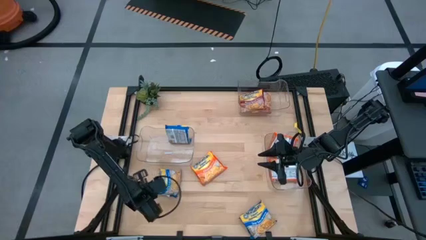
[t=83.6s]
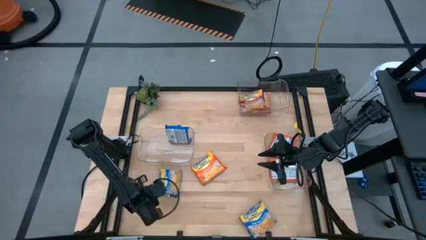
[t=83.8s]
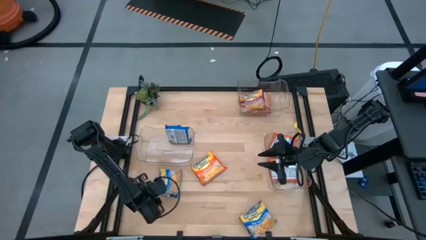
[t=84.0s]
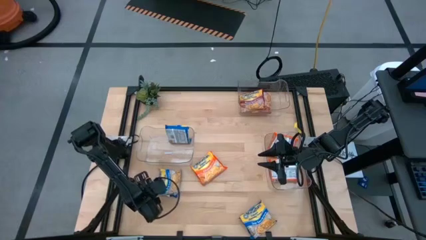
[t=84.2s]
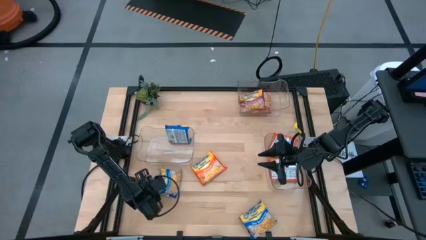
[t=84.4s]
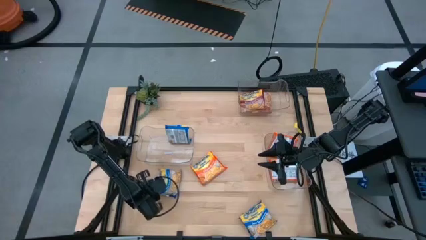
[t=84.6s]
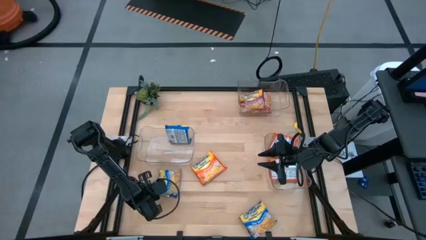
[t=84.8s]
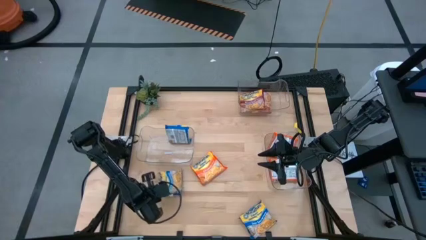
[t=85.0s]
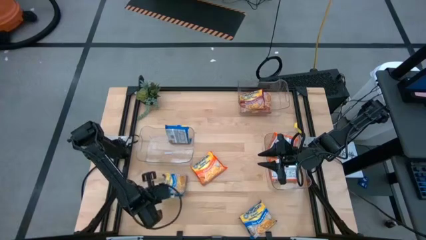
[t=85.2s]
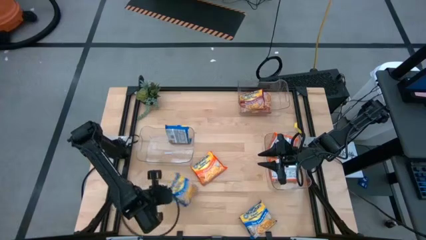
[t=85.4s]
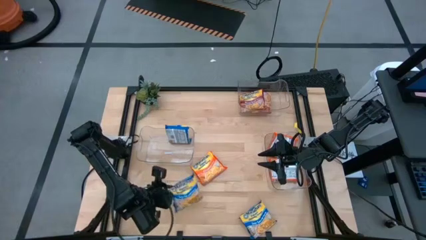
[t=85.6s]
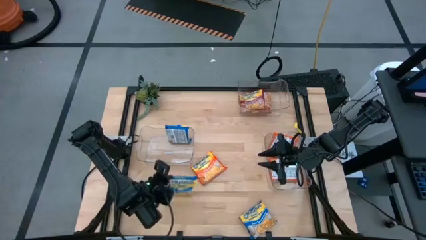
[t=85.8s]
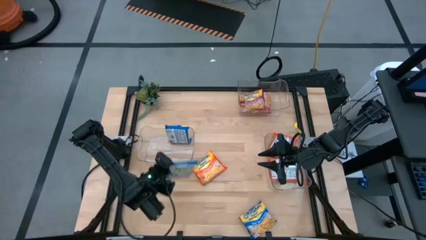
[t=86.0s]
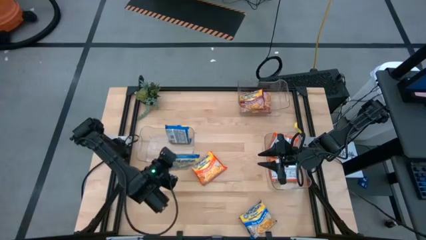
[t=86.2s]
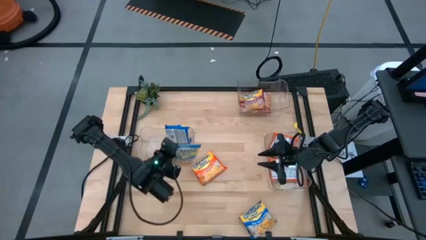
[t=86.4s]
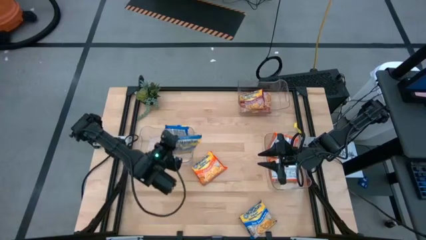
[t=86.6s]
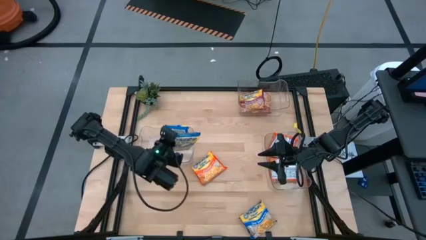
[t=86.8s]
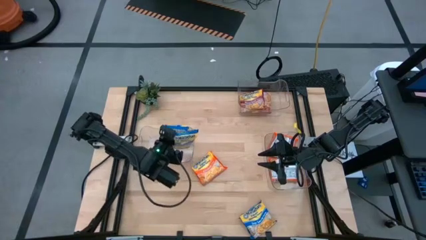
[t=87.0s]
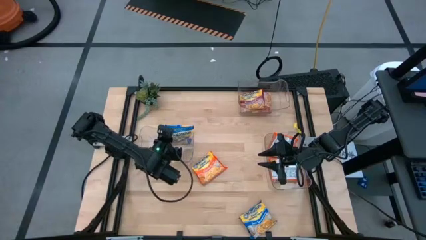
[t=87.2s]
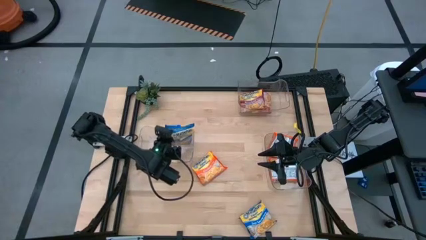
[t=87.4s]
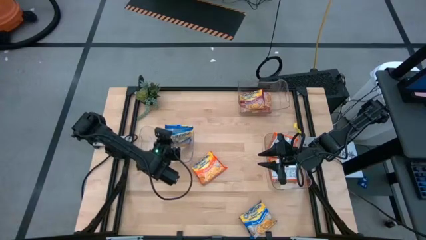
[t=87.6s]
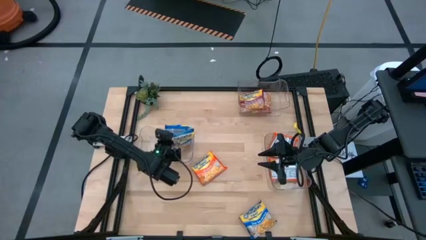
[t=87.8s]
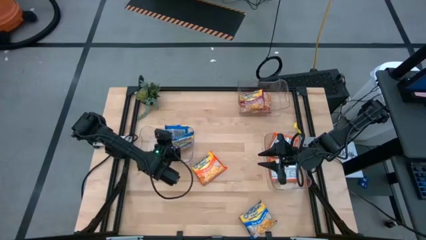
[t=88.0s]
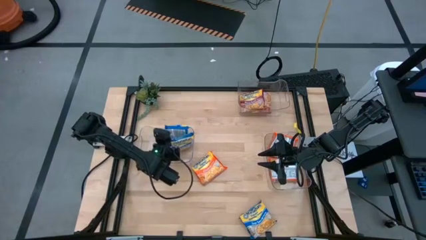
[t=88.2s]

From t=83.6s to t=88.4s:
Task: Sort Maruchan noodles
Put the top blue noodle pack into the bottom left transparent bin

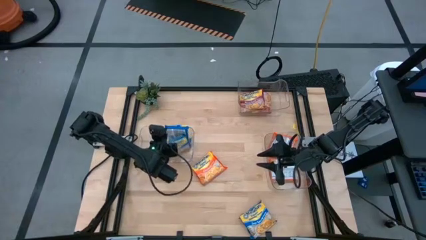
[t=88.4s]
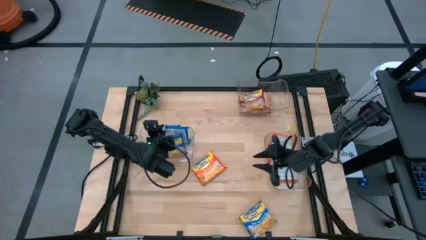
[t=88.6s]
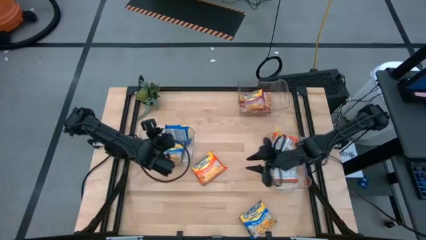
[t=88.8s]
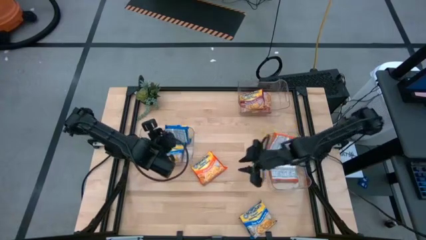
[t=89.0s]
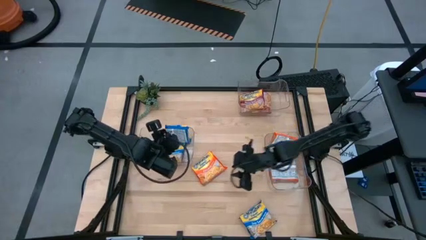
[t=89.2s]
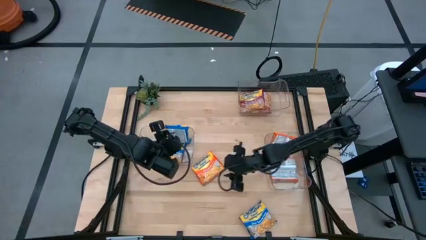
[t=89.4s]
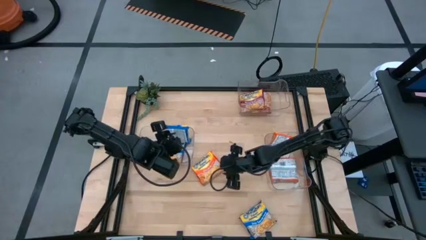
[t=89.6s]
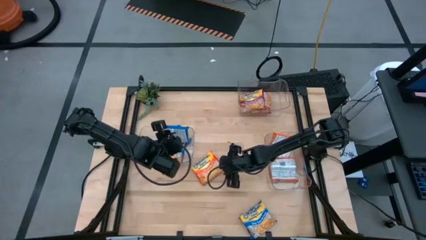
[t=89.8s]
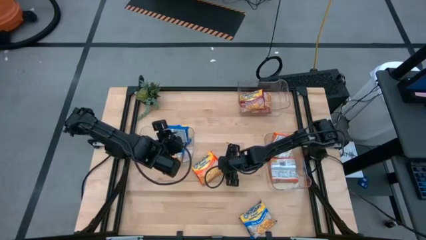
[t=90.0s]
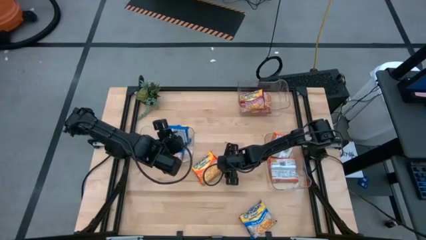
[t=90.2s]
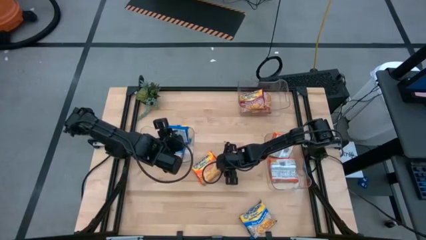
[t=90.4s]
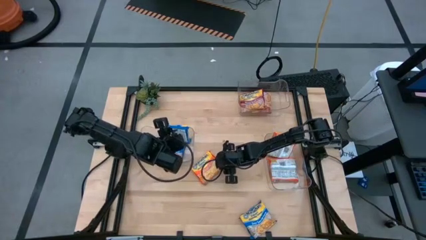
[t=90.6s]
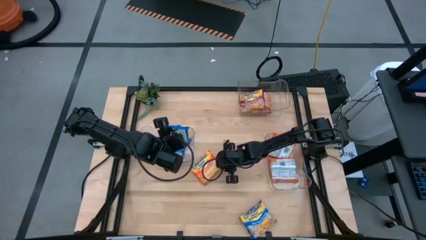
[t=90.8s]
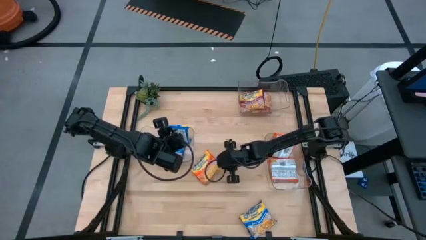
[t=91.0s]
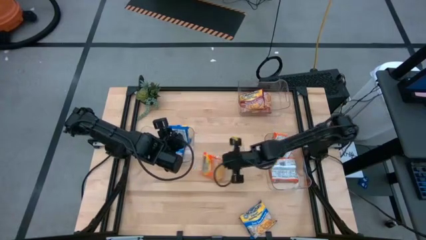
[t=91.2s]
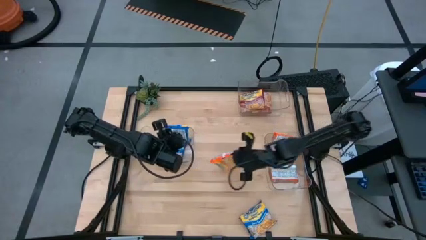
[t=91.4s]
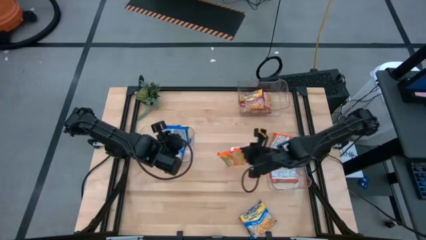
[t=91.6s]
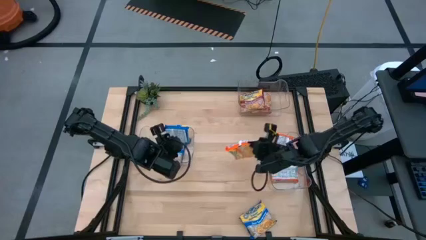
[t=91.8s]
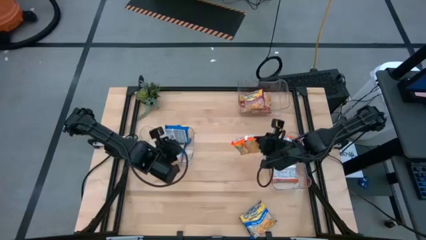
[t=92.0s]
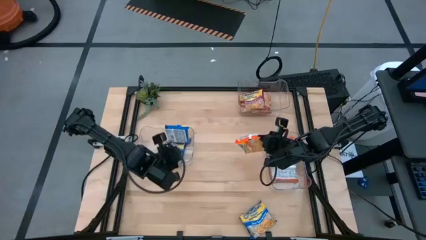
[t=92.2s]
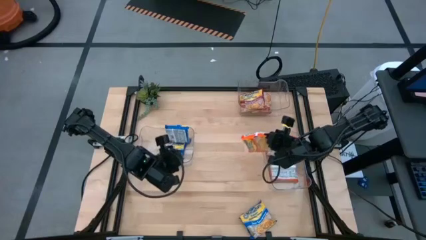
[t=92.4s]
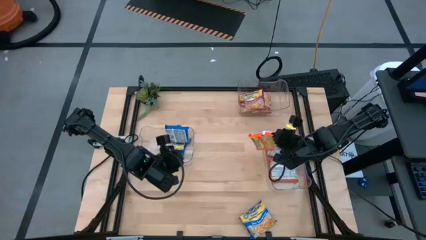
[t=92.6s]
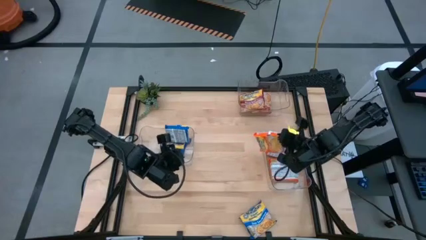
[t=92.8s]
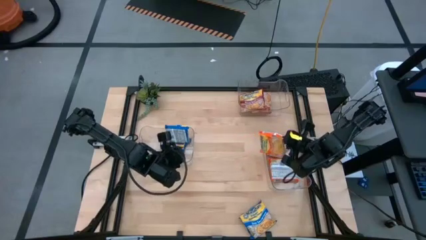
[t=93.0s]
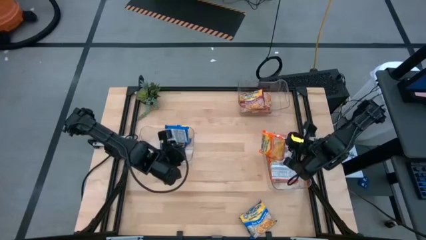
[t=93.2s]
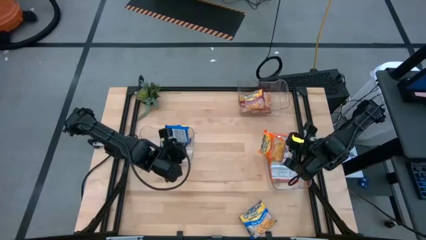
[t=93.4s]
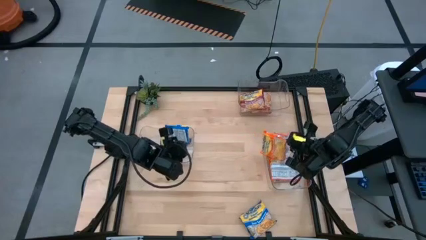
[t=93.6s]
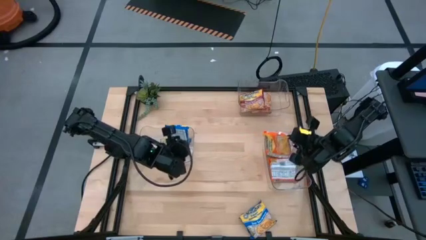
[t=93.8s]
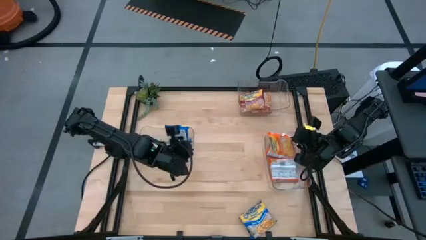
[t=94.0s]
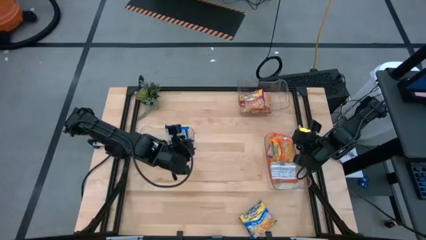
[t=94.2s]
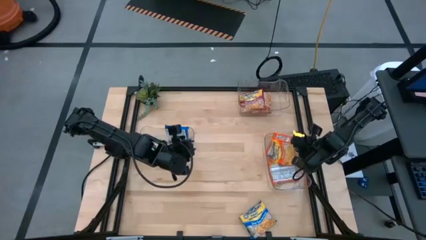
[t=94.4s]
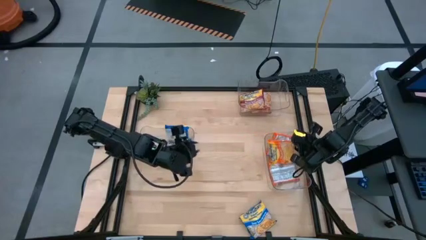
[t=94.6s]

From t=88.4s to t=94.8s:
Put the orange noodle pack into the bottom right transparent bin

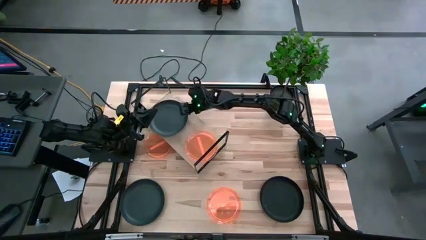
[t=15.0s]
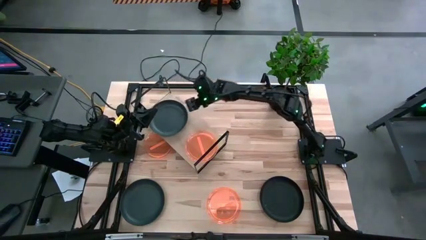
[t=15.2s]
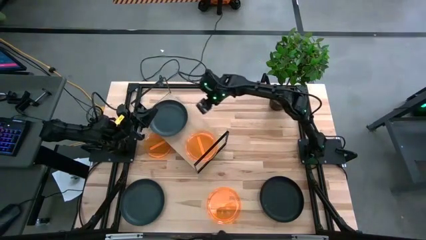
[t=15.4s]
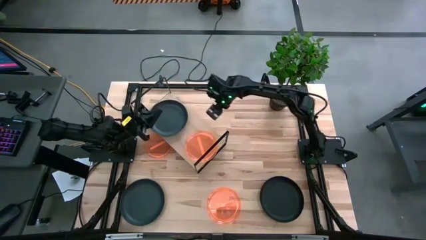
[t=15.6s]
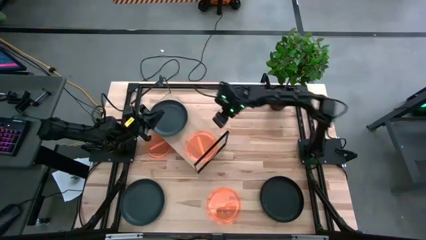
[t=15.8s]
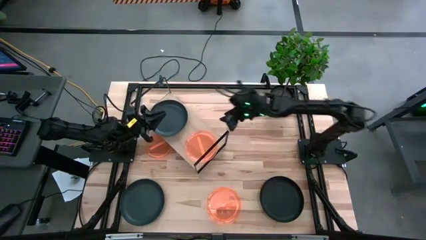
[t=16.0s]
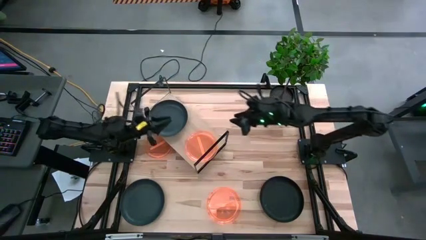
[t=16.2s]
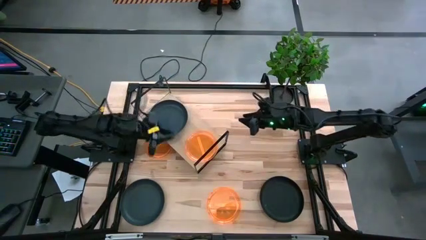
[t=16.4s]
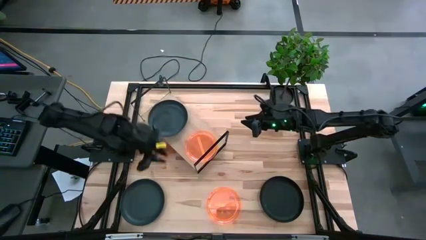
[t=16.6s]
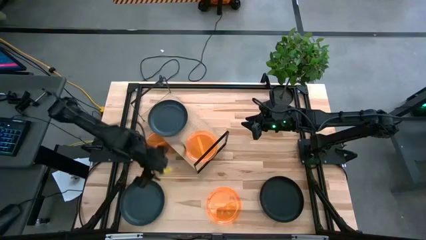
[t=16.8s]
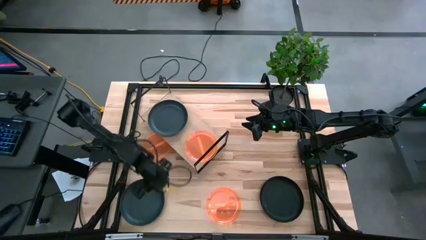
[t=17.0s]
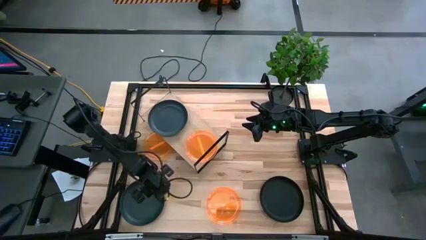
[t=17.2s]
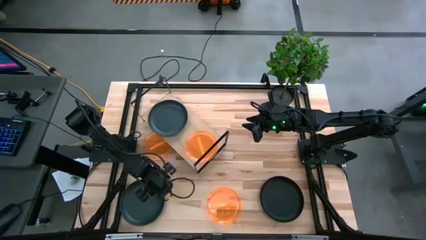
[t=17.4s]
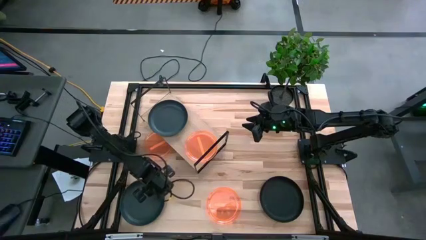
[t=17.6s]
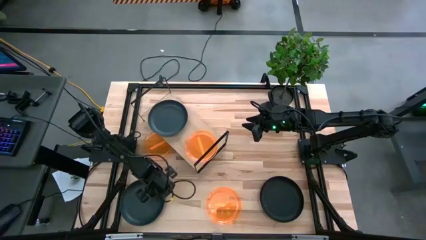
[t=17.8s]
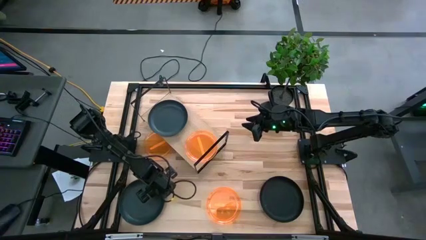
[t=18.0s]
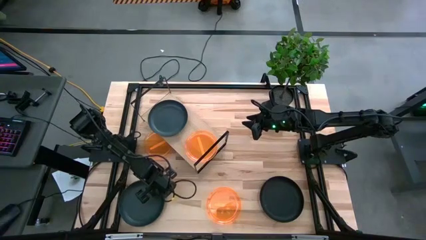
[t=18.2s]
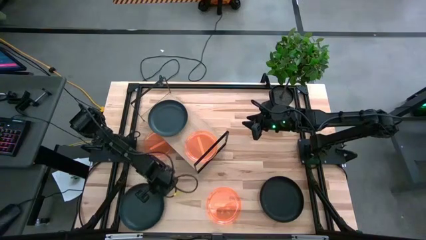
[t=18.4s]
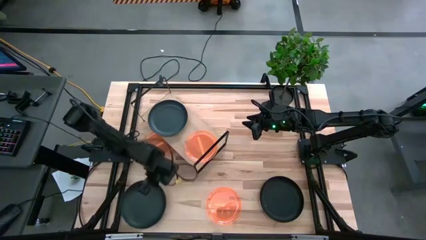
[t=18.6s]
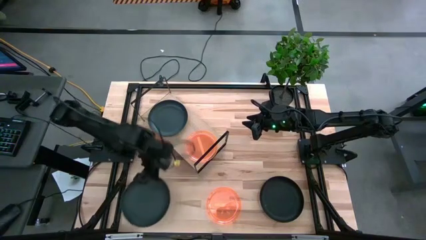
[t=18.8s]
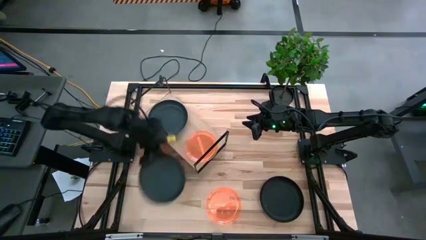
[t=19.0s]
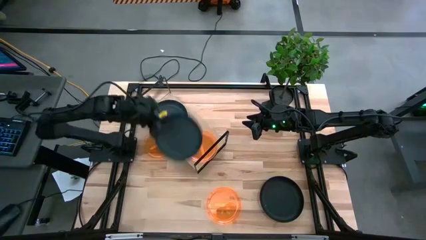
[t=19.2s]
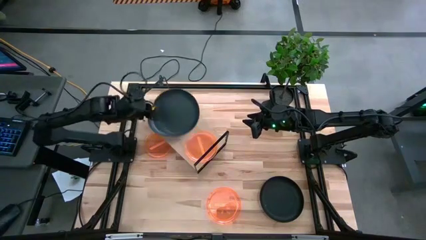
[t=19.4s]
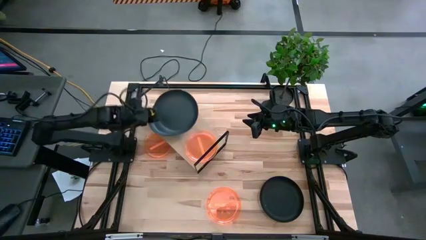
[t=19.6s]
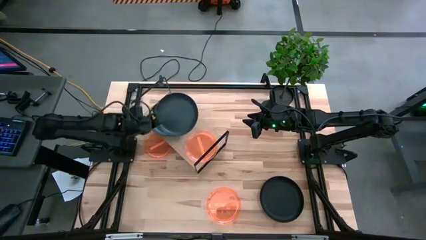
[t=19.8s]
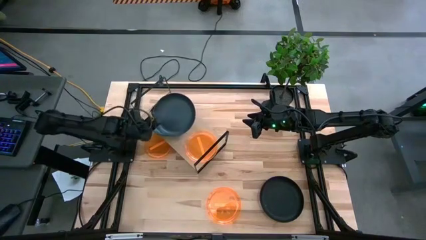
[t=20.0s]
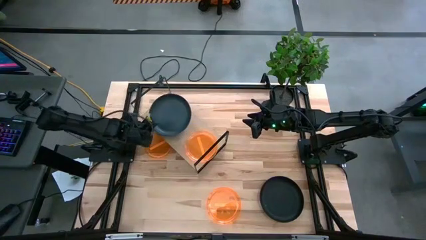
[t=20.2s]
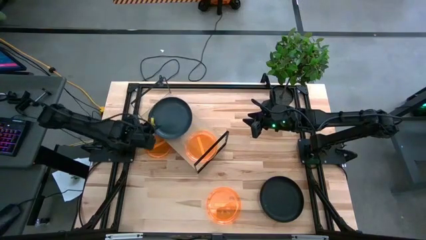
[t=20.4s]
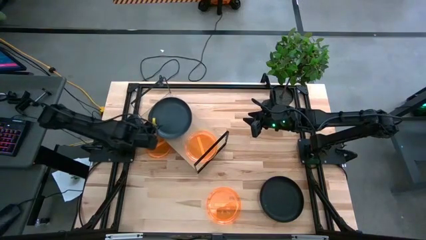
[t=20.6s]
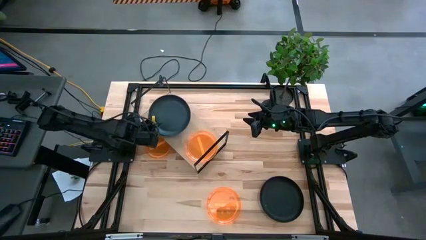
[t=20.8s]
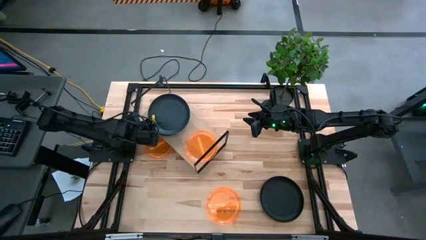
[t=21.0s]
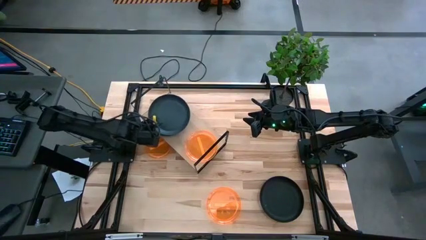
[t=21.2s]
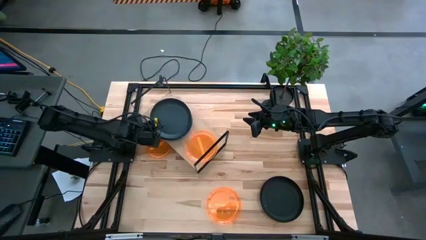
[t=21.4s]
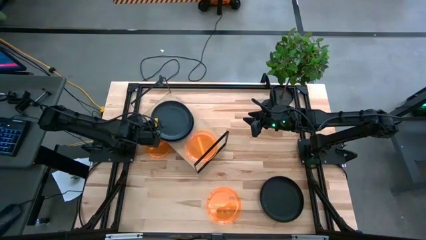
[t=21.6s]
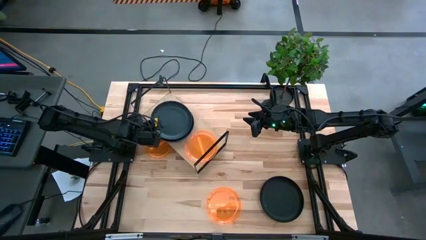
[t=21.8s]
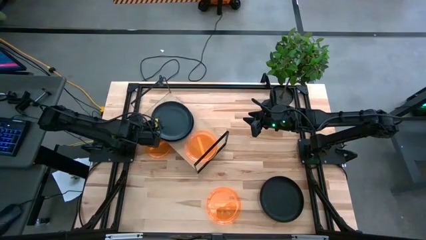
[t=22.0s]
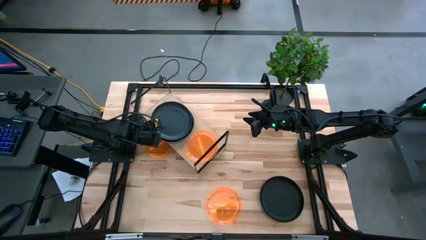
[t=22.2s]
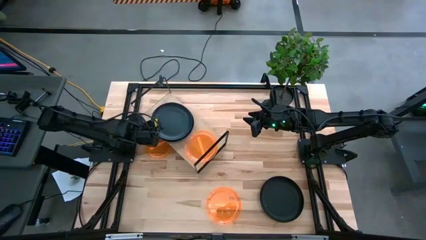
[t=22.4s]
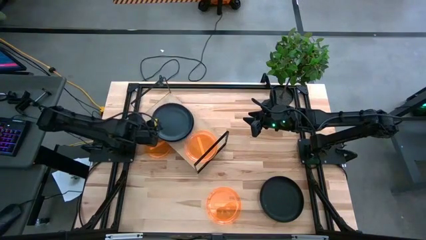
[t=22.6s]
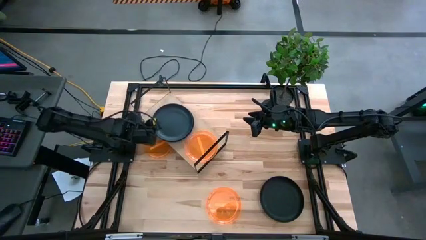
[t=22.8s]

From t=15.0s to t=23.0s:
Task: Place and stack plates onto a shelf
Stack the left black plate on top of the black plate on the shelf
